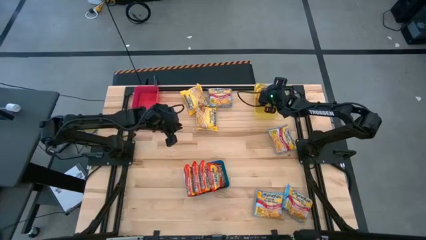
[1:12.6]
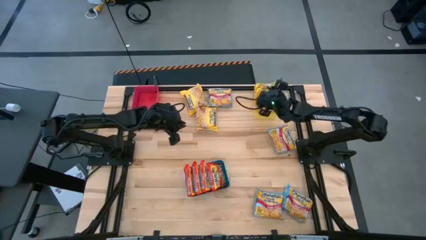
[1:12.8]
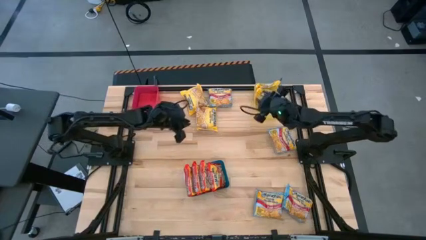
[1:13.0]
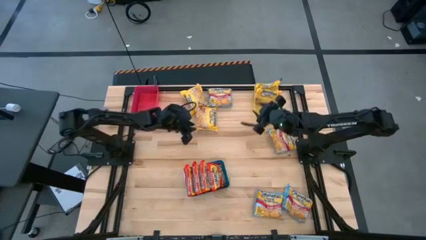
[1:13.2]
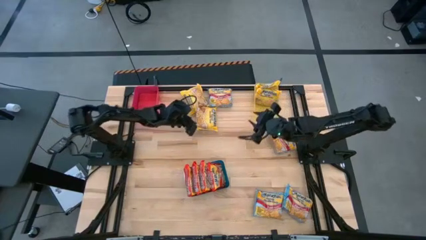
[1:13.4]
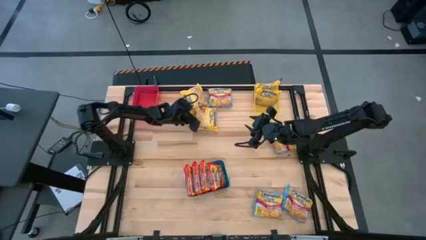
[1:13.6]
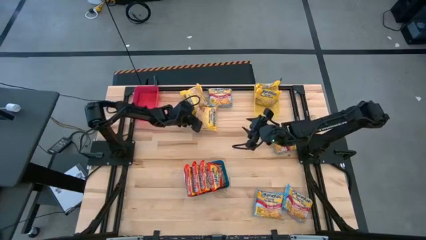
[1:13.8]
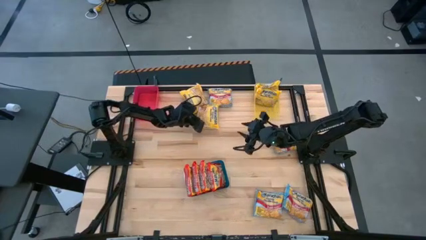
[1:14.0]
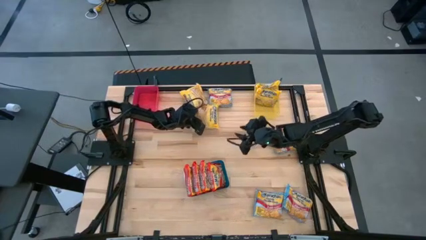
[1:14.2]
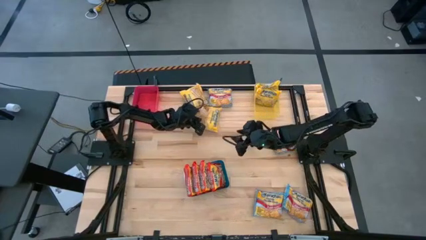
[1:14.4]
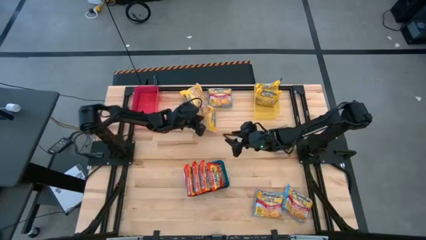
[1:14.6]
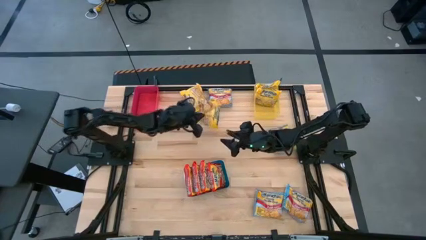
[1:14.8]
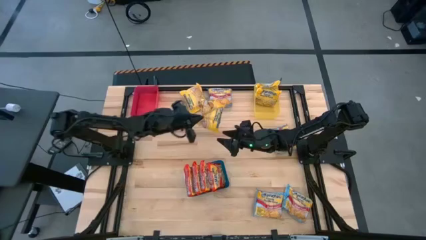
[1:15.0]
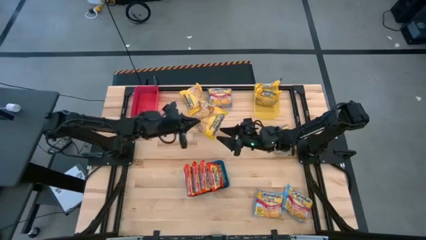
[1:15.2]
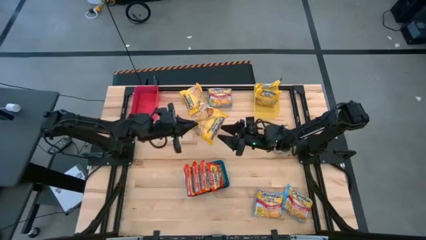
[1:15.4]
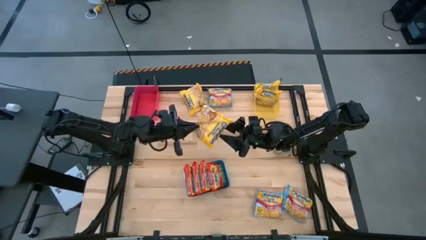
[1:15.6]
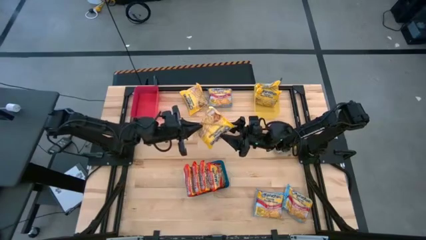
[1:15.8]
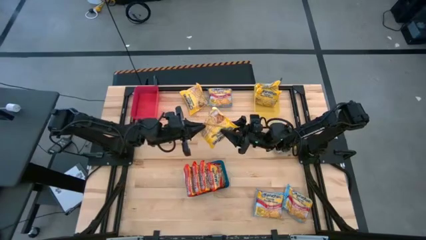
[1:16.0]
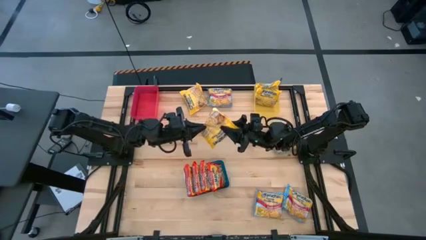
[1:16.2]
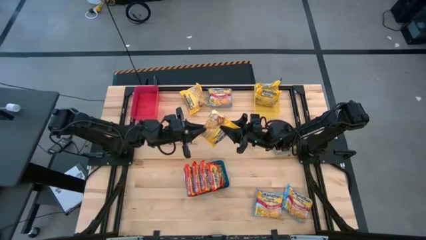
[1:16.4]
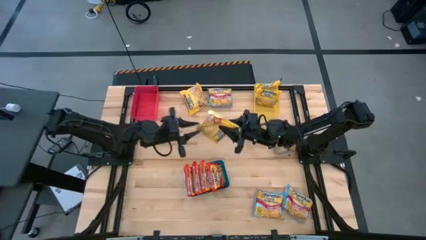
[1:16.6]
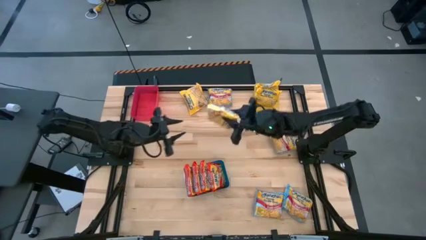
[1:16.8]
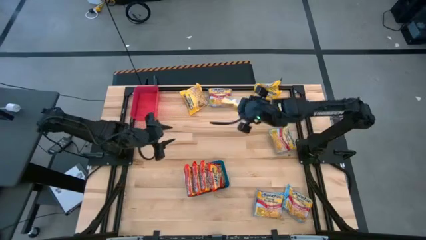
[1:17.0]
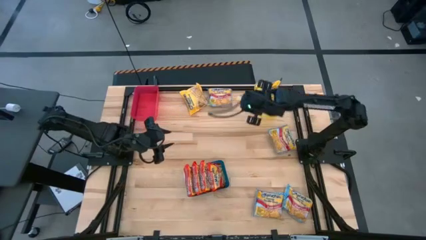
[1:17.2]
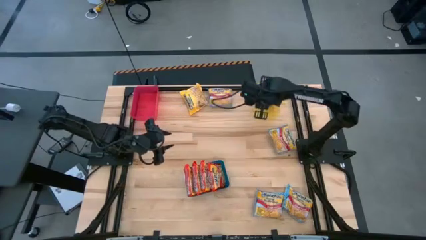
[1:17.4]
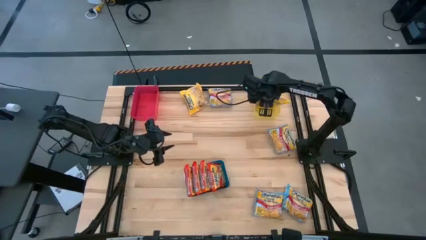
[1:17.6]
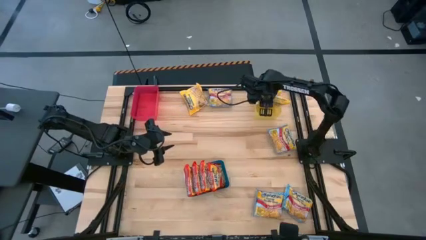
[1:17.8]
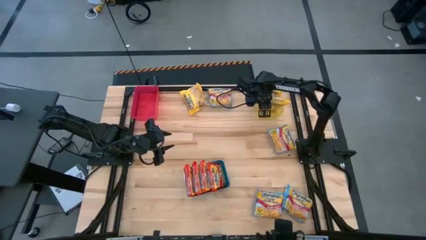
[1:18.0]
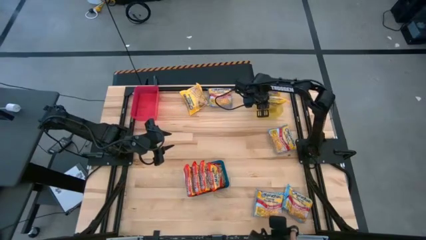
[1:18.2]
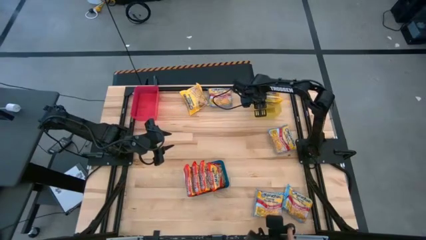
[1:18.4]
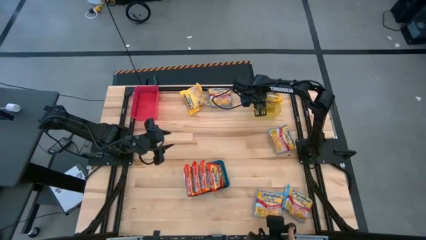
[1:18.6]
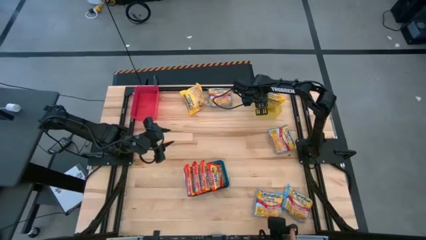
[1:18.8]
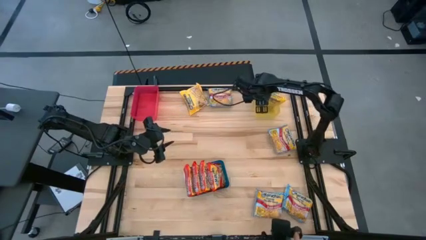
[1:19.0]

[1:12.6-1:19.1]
Task: Sort Maruchan noodles
Put the noodle pack into the yellow bin

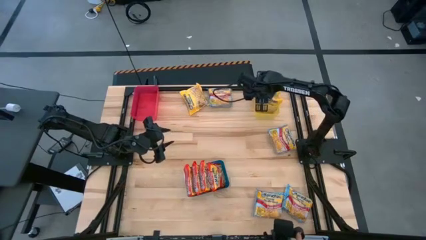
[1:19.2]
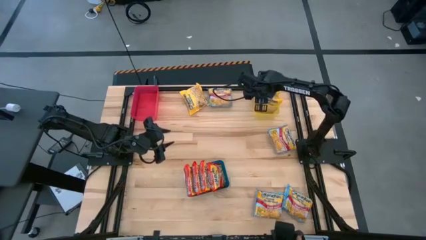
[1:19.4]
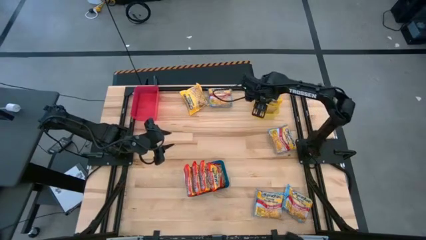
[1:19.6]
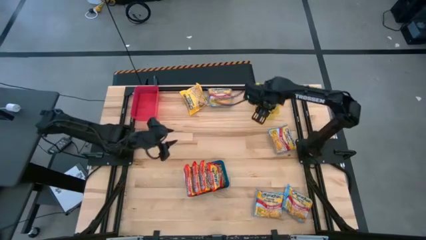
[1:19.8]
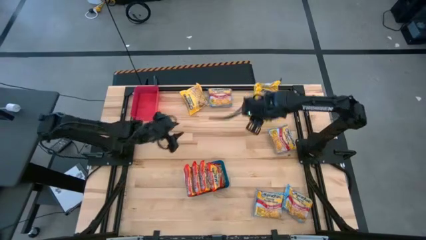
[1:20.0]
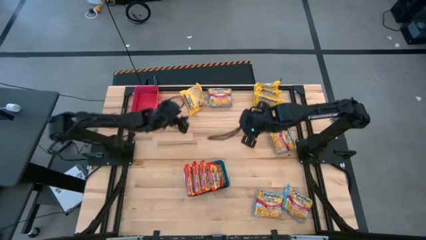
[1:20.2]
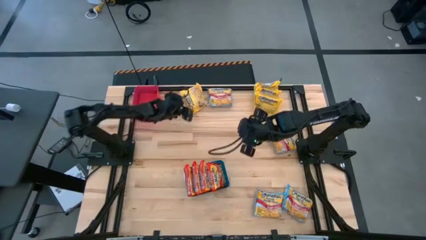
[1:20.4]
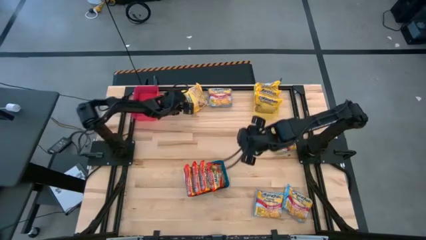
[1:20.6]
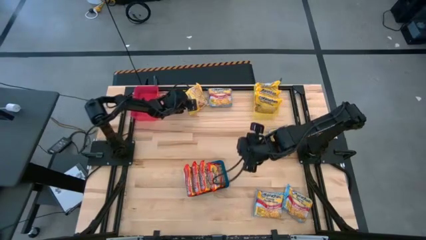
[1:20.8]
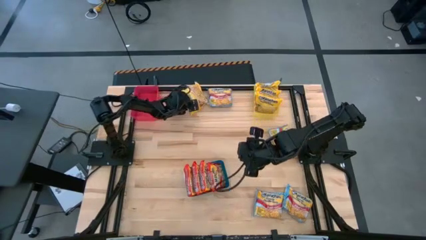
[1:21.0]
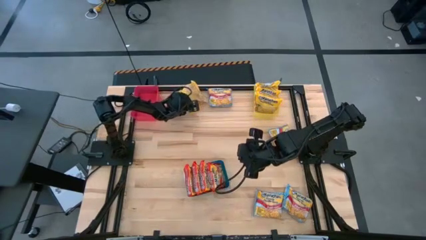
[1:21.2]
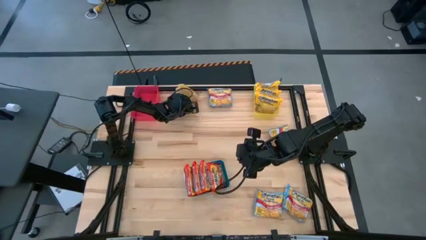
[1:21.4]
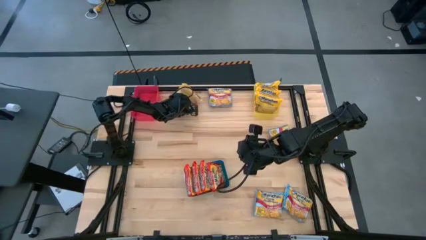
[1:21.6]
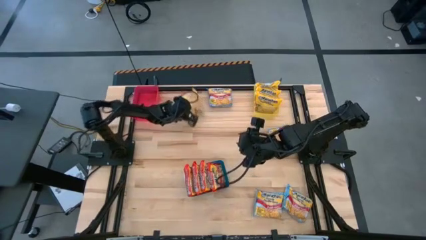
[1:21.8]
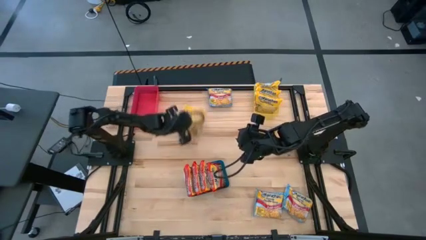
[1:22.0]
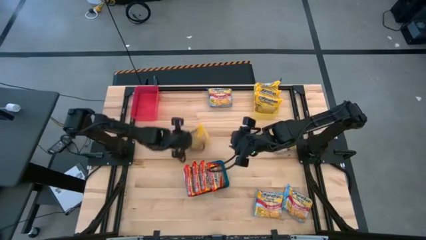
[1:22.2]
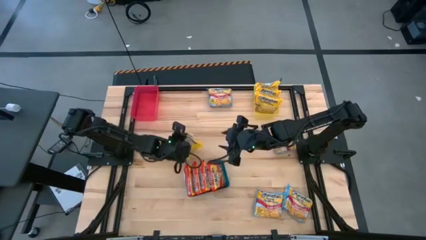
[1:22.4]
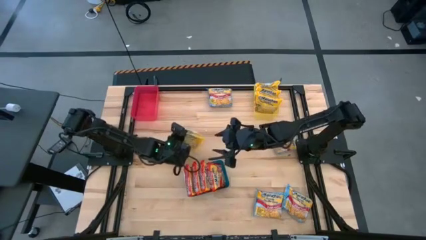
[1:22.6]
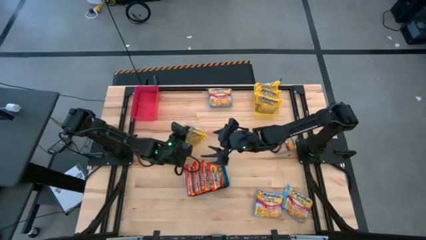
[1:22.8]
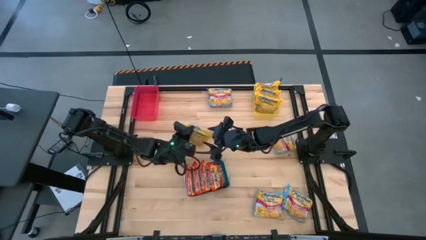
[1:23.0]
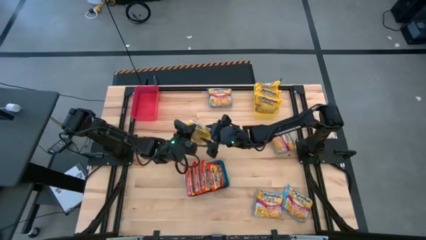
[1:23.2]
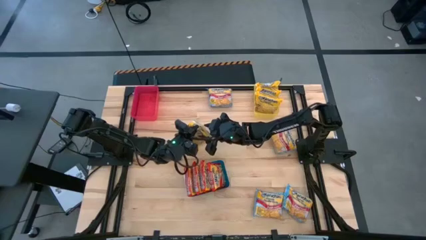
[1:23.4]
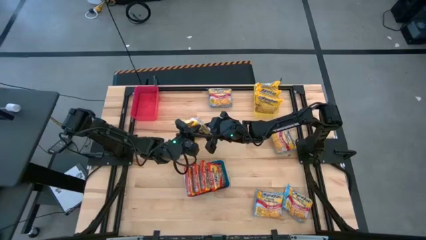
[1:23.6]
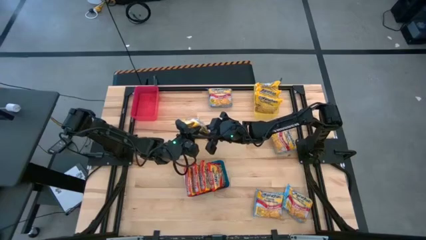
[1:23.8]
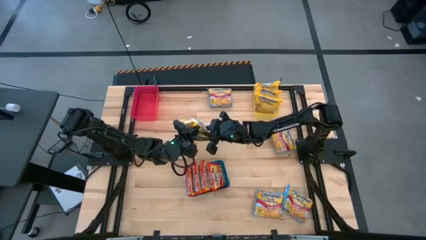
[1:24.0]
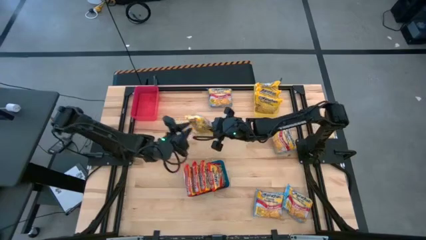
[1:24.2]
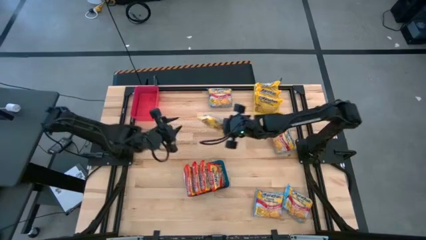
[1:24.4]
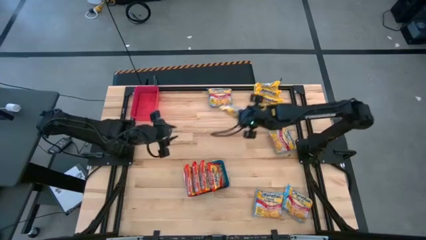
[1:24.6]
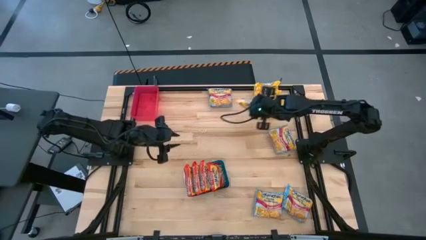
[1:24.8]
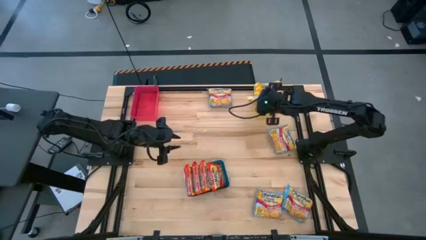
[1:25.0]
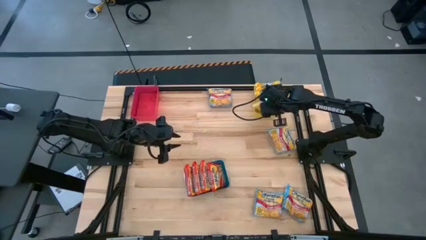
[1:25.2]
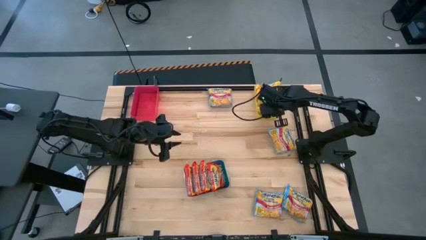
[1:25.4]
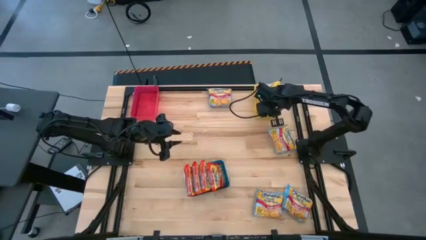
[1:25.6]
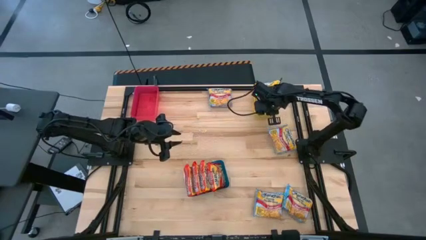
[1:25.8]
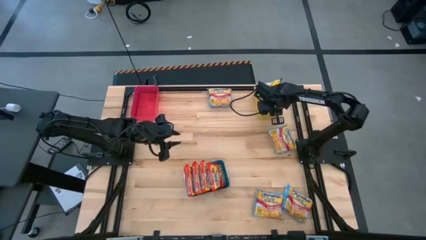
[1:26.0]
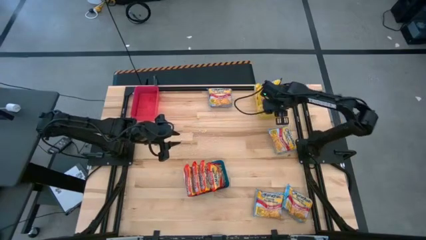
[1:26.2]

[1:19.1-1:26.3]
Put the yellow noodle pack into the yellow bin
